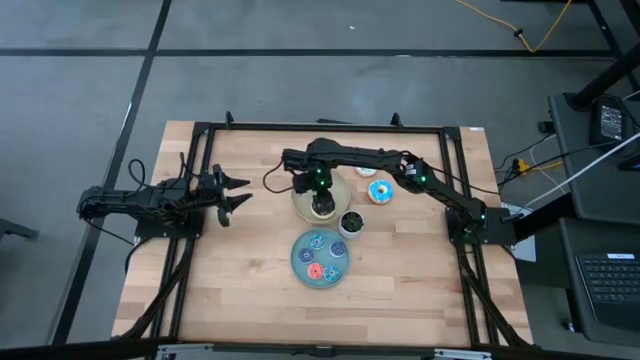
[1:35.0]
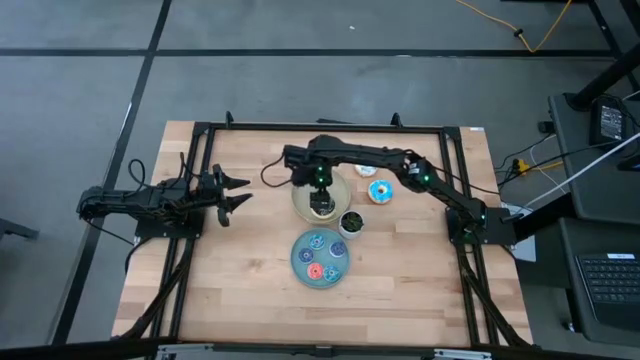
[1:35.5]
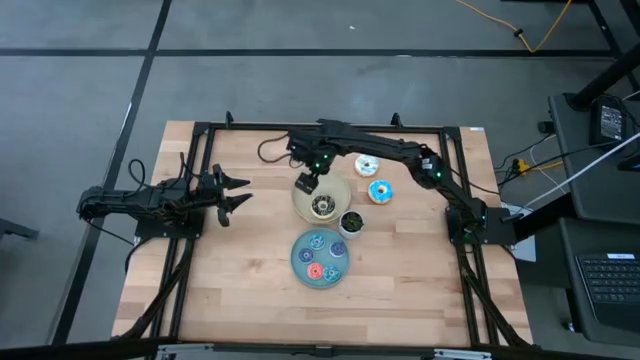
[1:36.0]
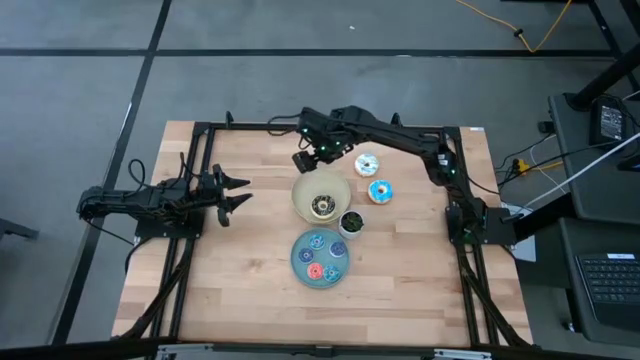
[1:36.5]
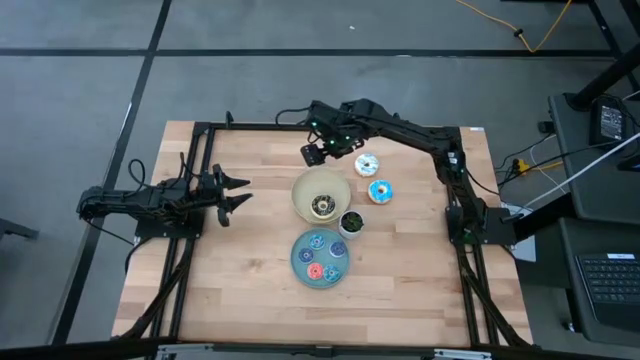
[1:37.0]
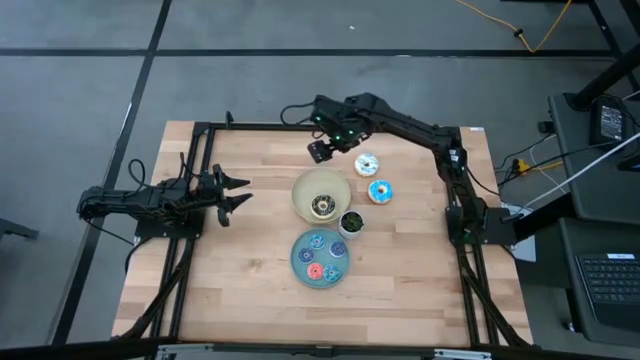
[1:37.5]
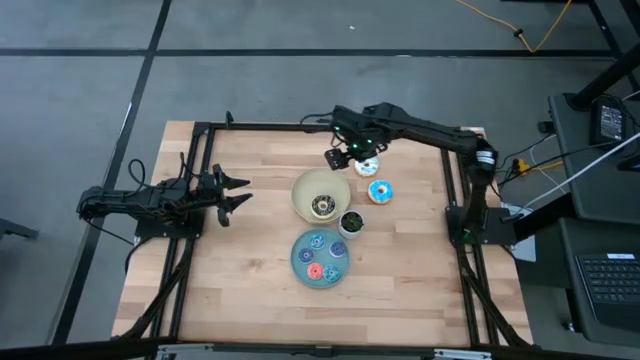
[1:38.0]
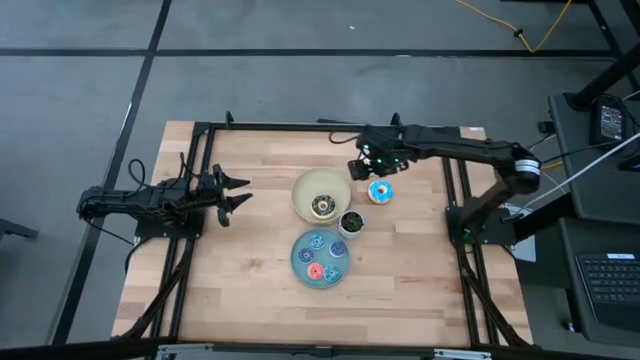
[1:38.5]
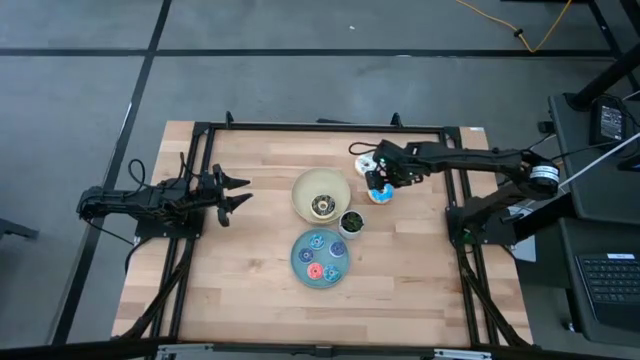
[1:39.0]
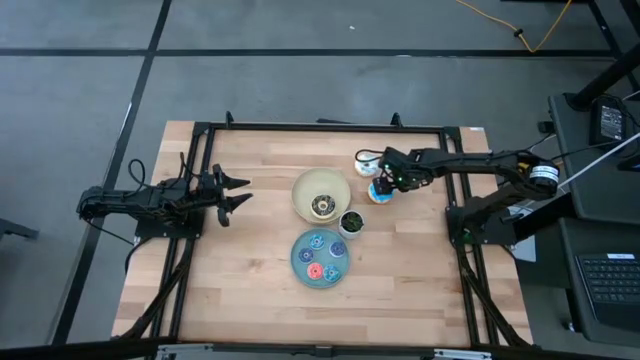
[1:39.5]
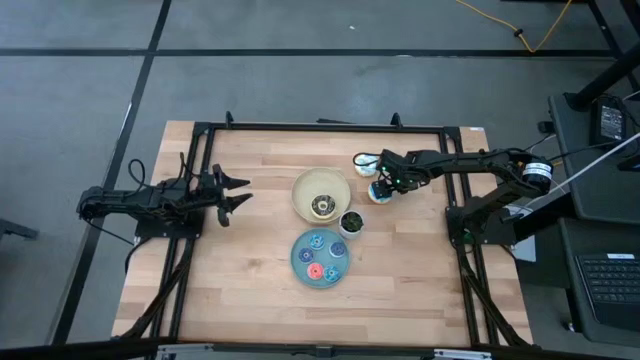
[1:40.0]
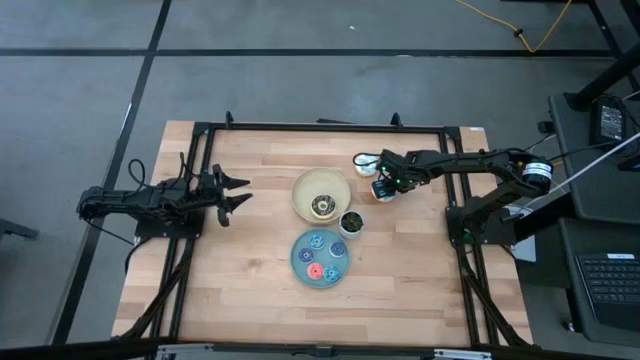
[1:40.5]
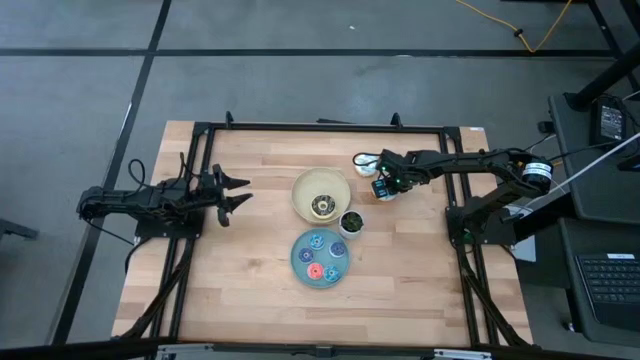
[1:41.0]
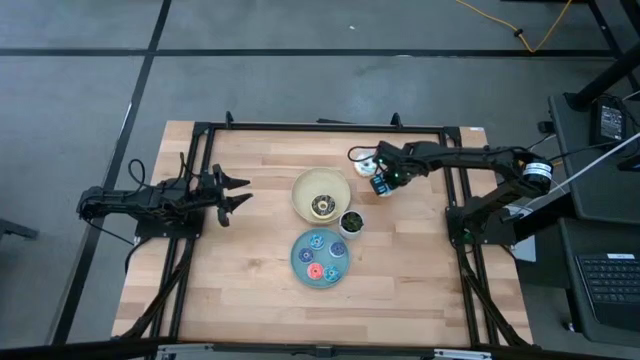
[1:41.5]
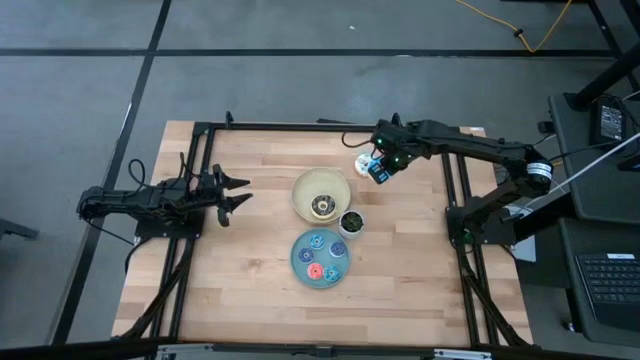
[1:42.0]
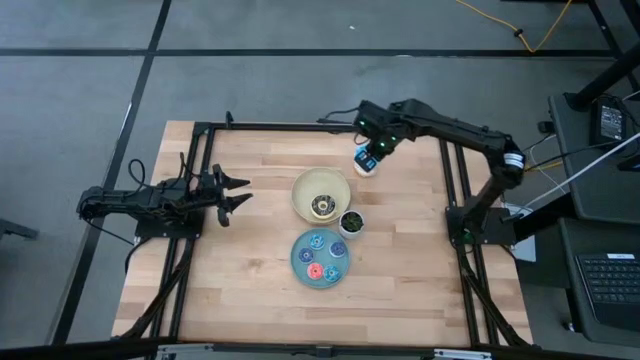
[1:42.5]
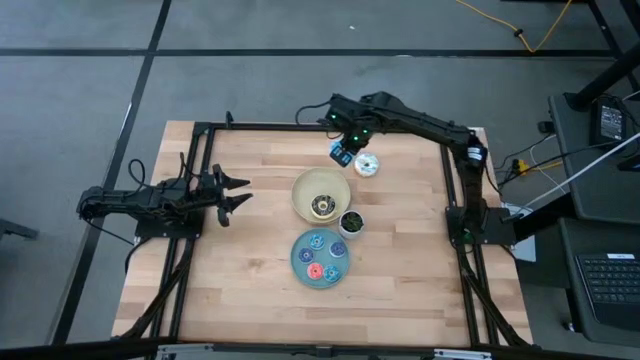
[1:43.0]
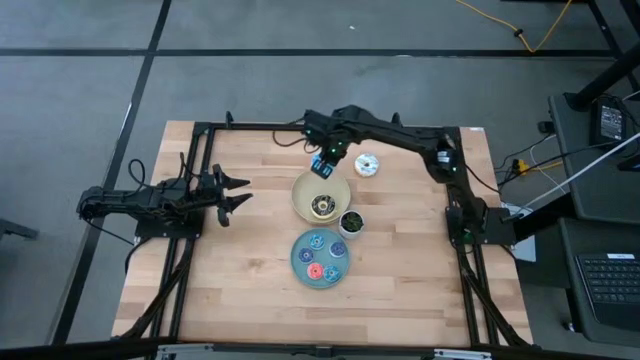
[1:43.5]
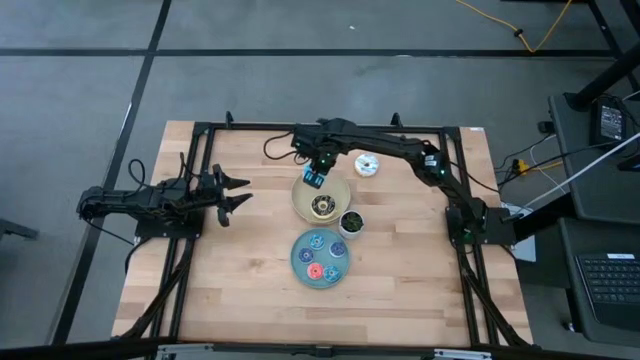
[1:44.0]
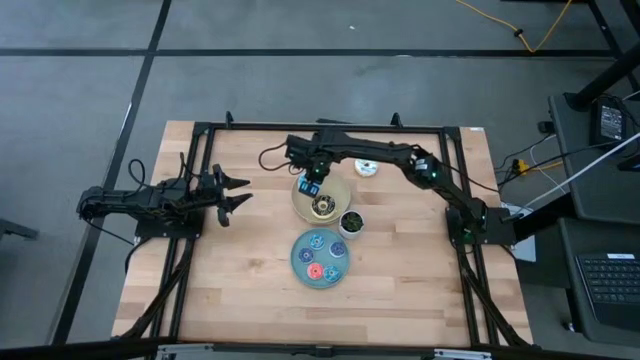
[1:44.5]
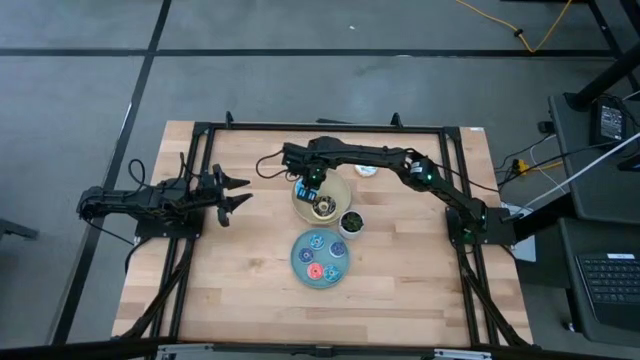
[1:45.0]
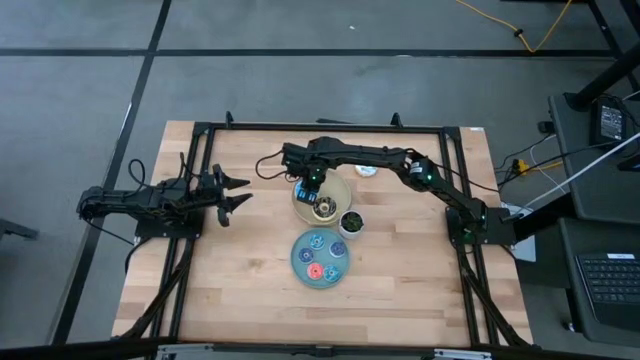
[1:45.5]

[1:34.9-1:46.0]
Task: Pick & Place donuts
Put the large blue donut on the gray plate

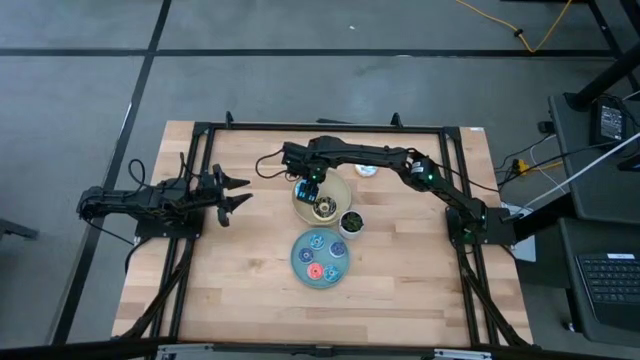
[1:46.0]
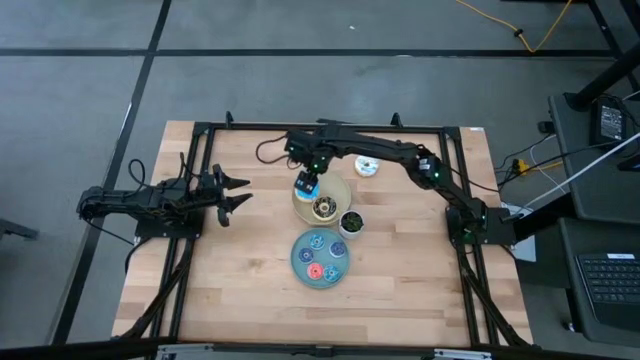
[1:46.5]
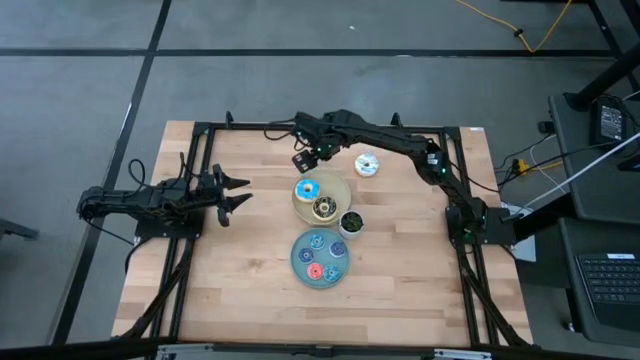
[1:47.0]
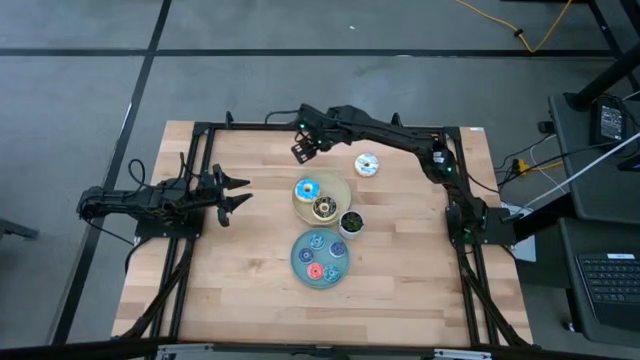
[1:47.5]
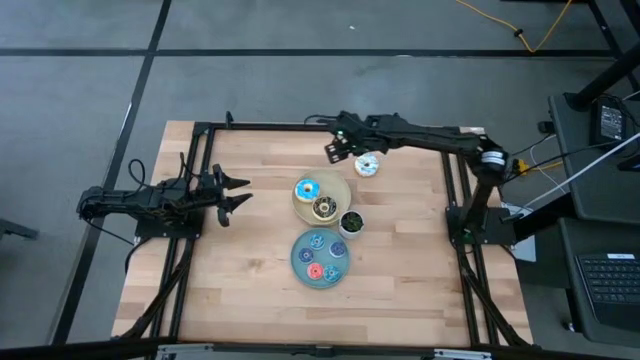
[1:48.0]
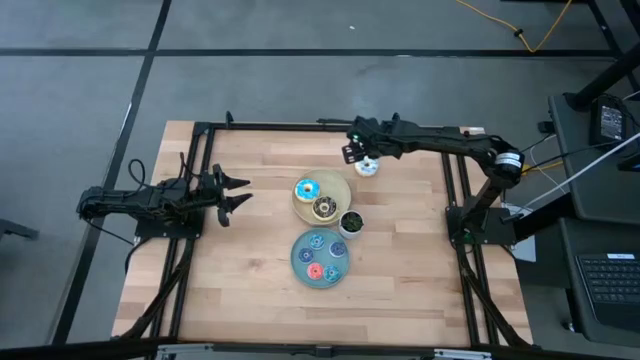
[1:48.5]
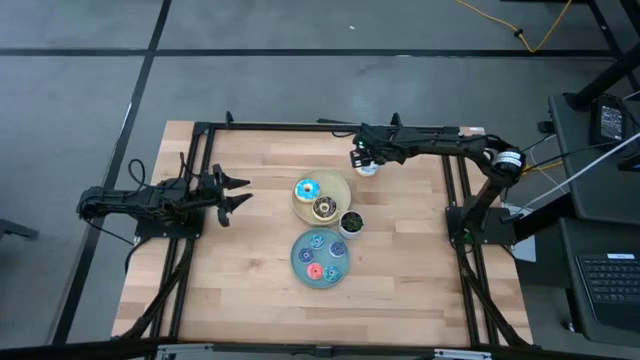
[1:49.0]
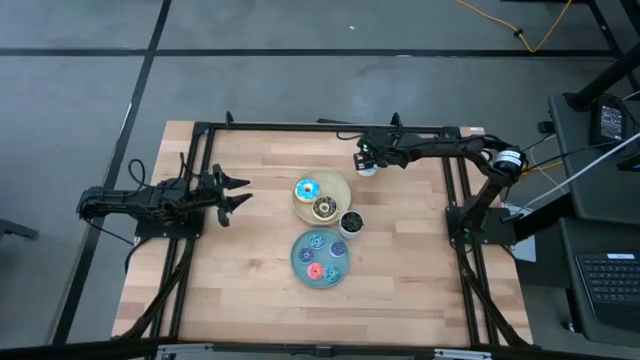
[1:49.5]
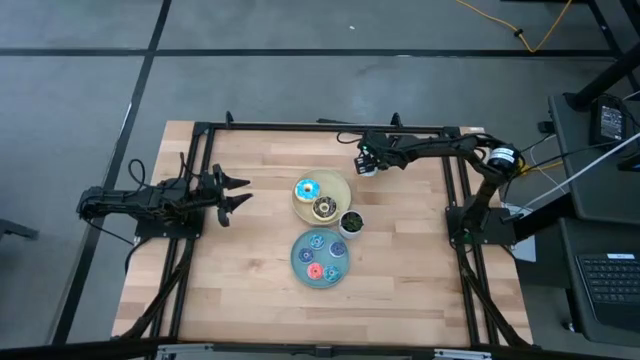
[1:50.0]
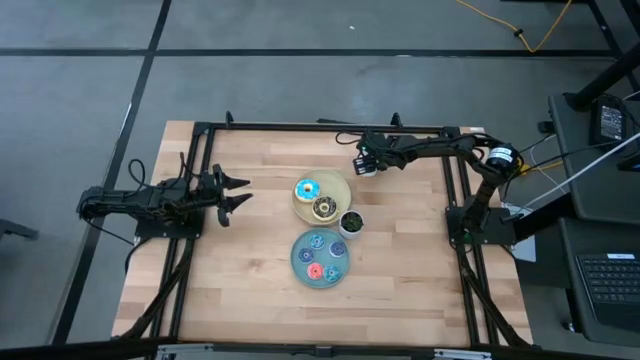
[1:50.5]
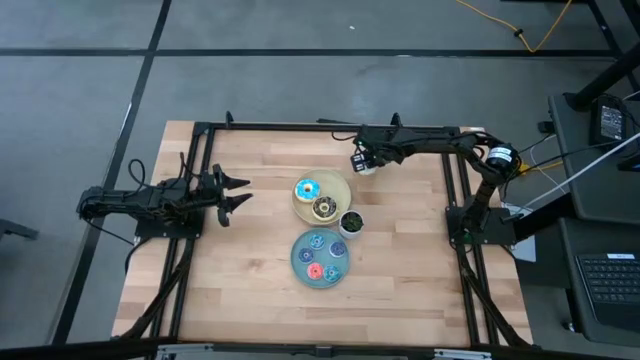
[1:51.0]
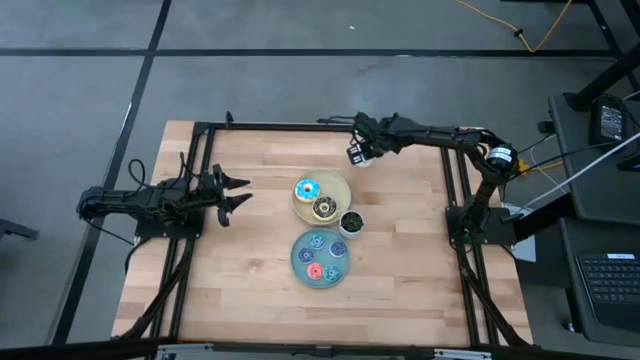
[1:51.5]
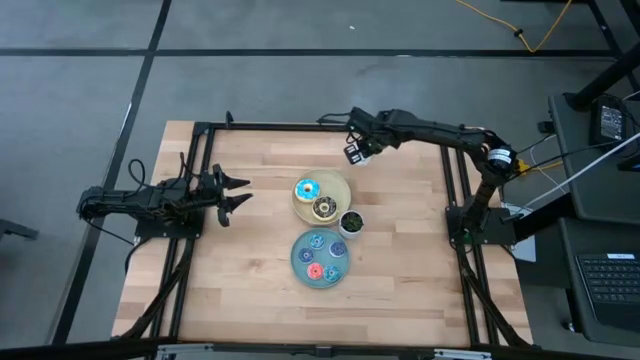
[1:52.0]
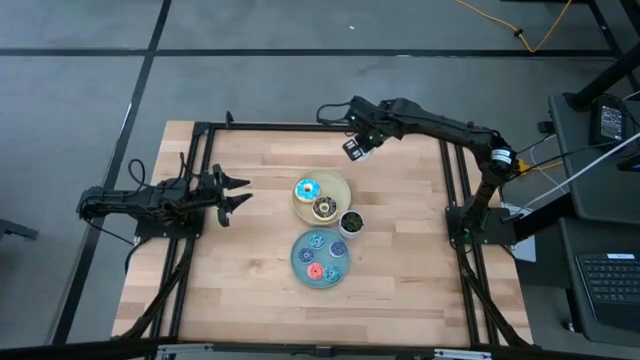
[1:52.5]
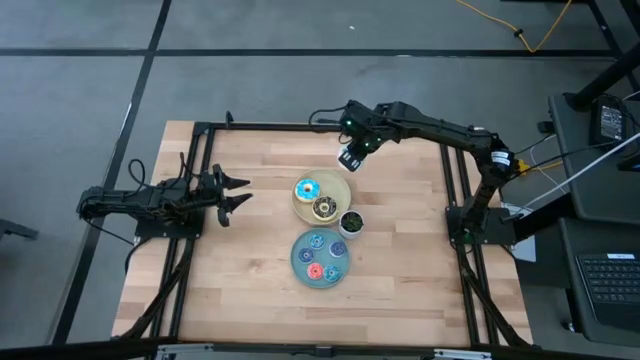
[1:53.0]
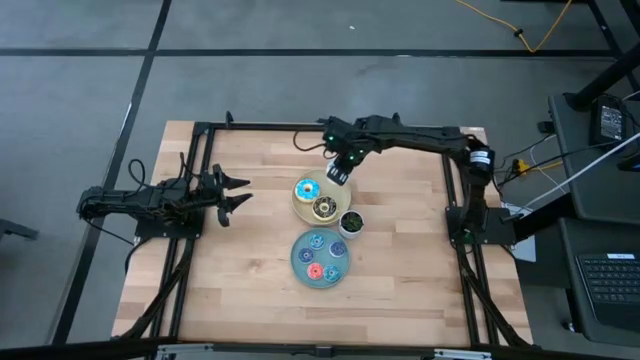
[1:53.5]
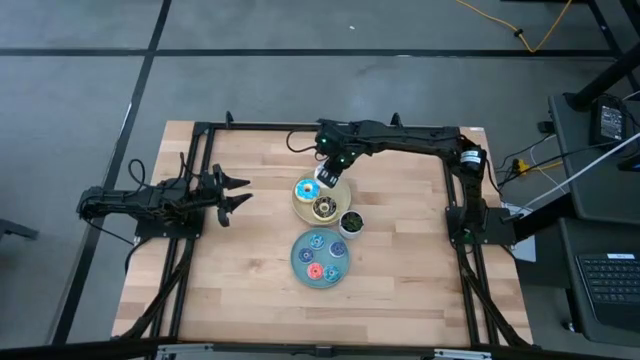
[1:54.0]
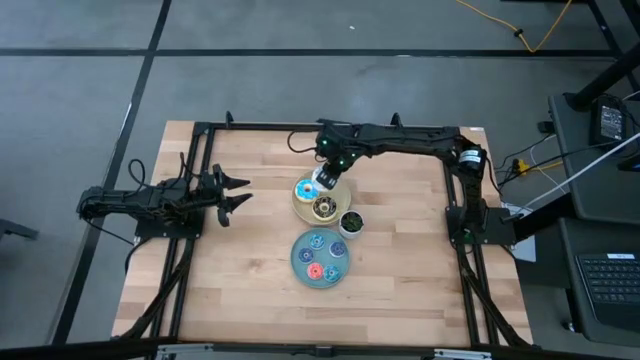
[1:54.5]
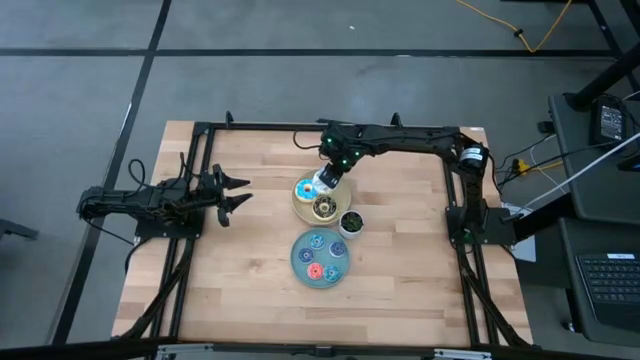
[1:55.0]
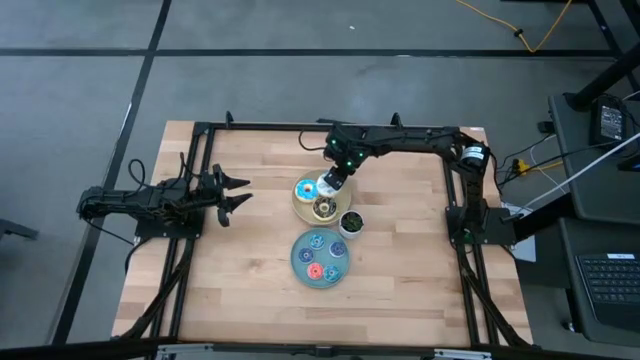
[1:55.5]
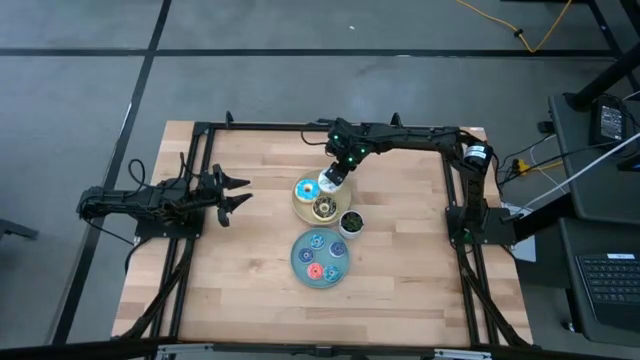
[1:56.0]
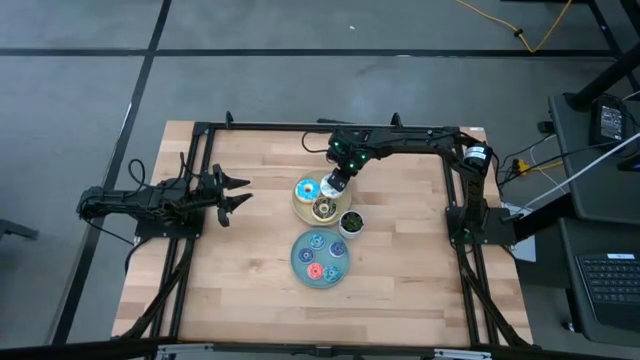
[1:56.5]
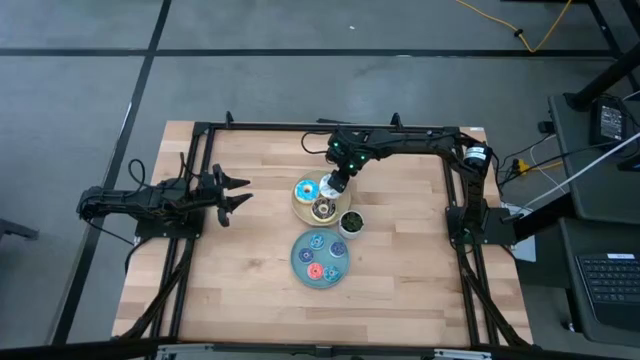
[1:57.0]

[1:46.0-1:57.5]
Put the large white donut on the gray plate

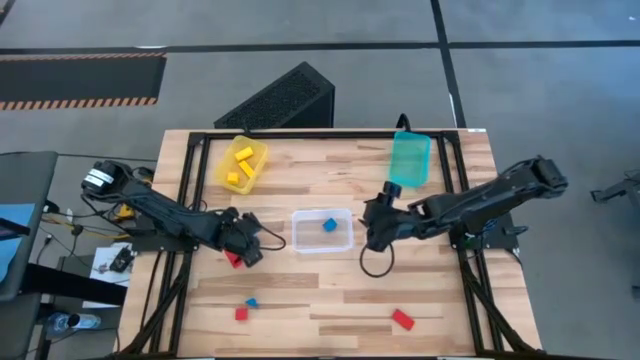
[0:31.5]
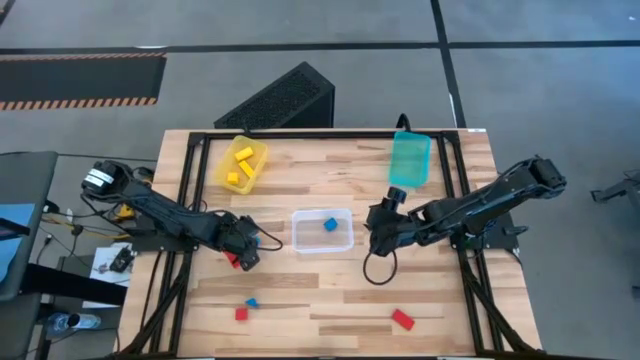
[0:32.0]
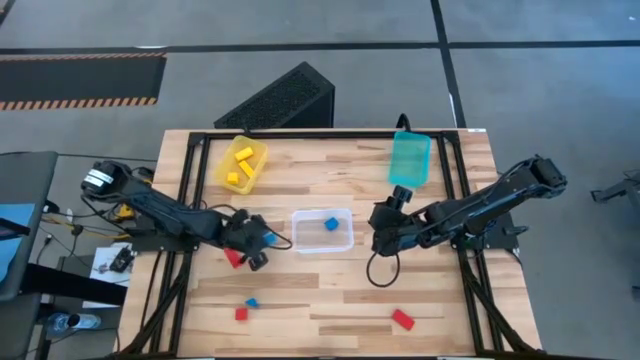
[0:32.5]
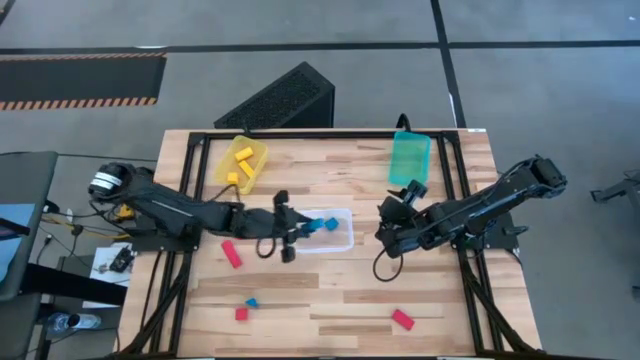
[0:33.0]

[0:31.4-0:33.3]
Task: Sort & place blocks by color
Put the top blue block into the transparent bin
